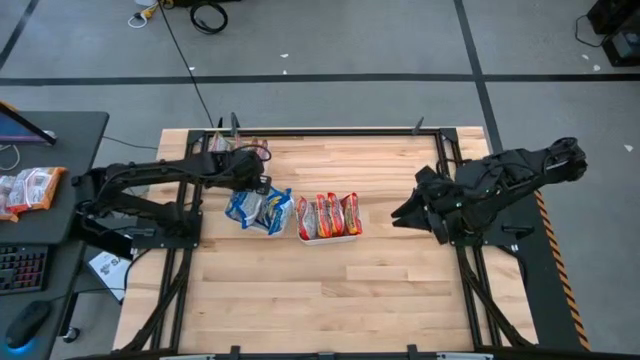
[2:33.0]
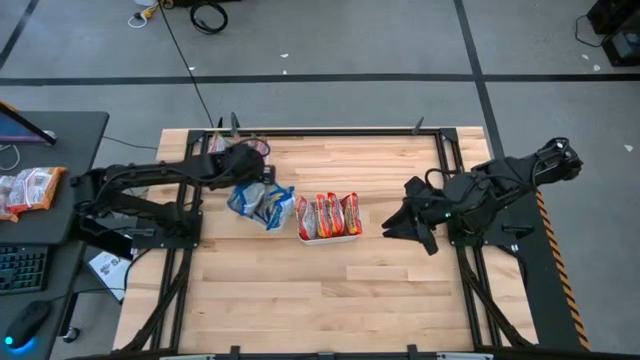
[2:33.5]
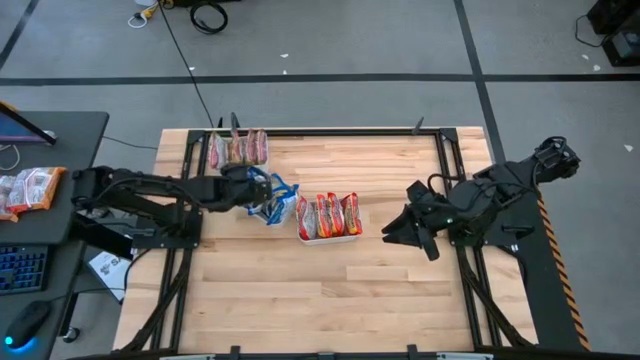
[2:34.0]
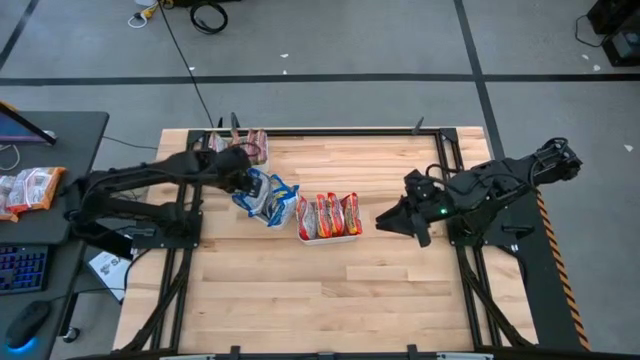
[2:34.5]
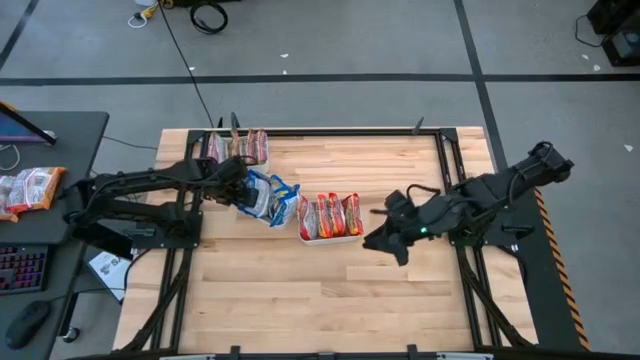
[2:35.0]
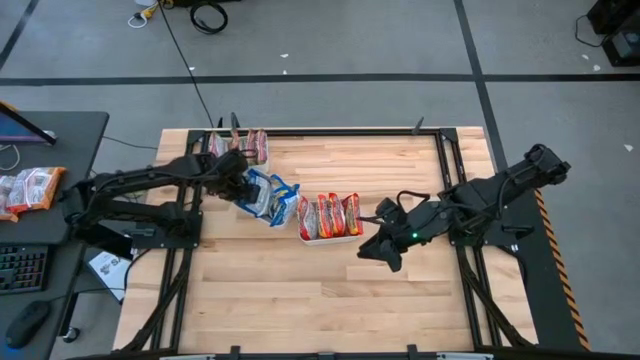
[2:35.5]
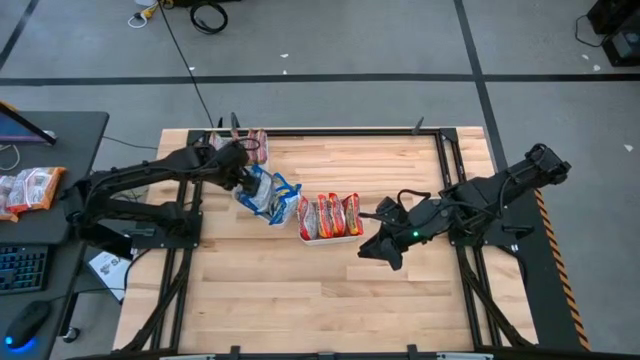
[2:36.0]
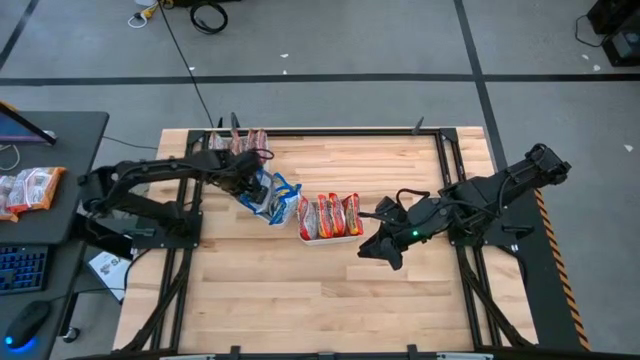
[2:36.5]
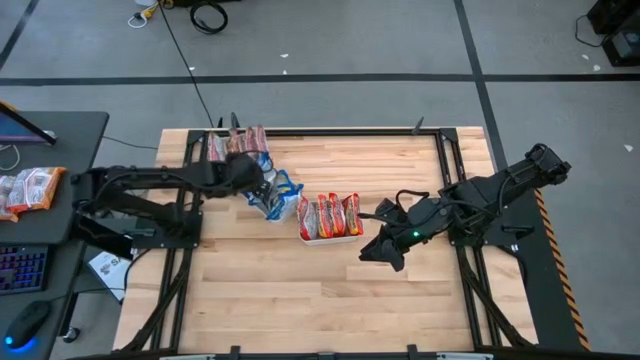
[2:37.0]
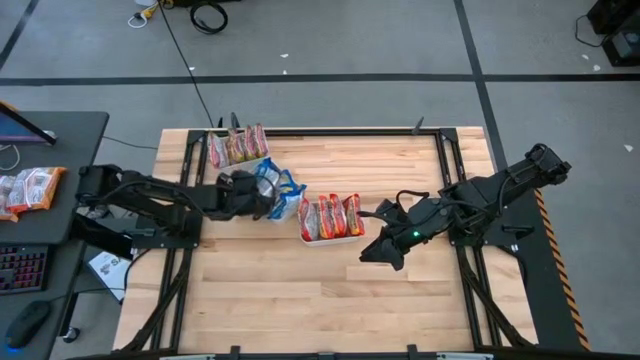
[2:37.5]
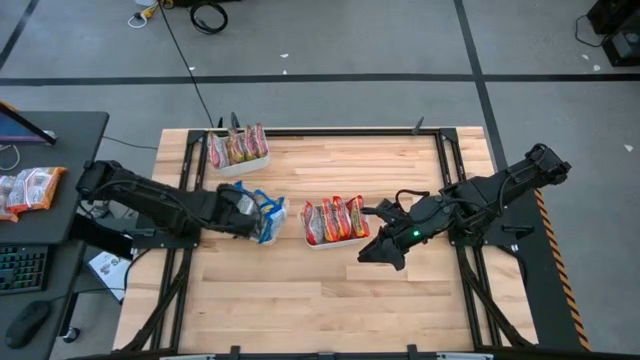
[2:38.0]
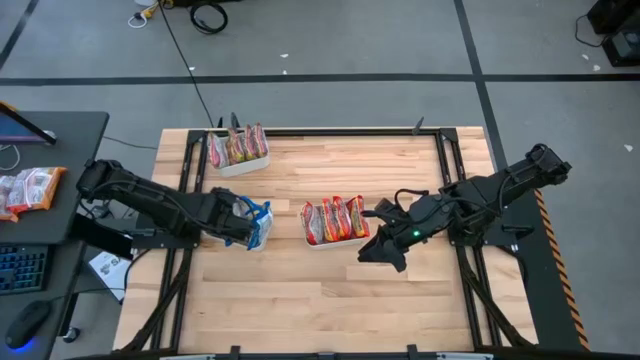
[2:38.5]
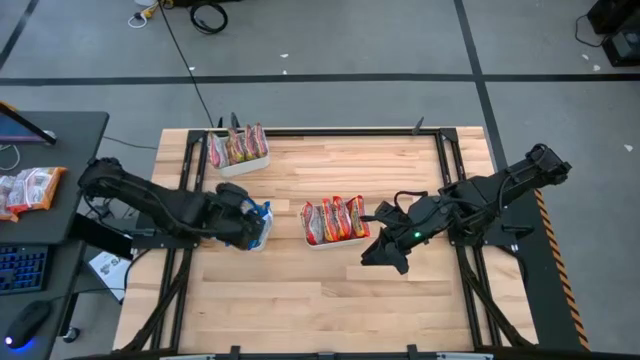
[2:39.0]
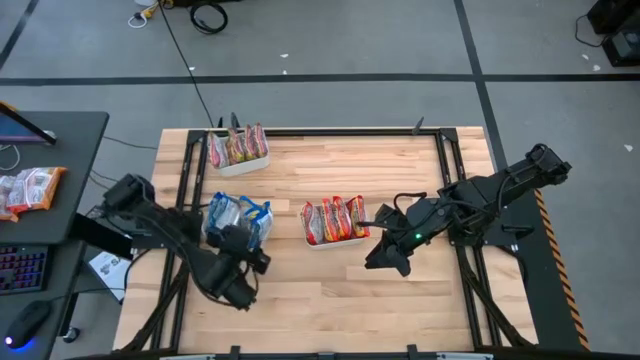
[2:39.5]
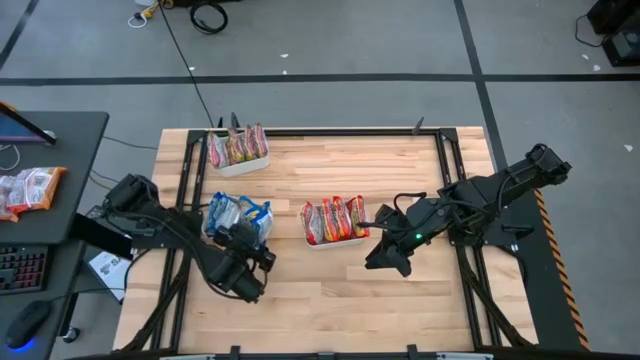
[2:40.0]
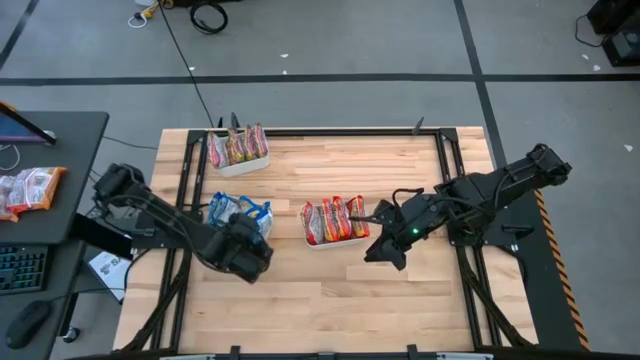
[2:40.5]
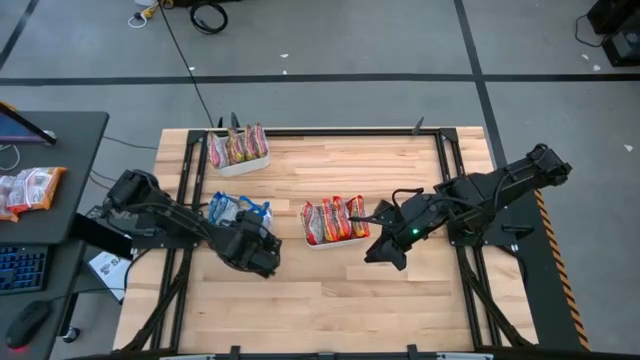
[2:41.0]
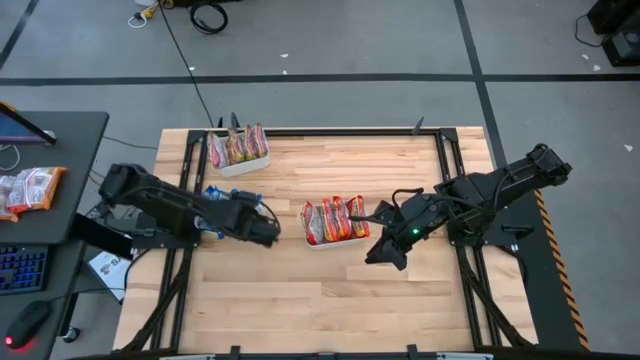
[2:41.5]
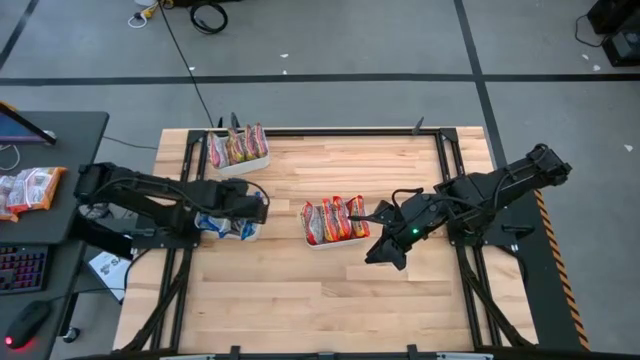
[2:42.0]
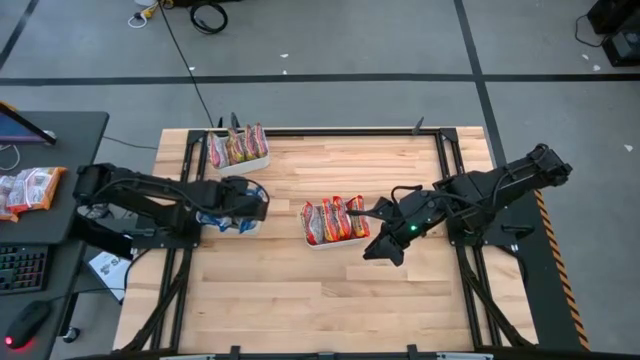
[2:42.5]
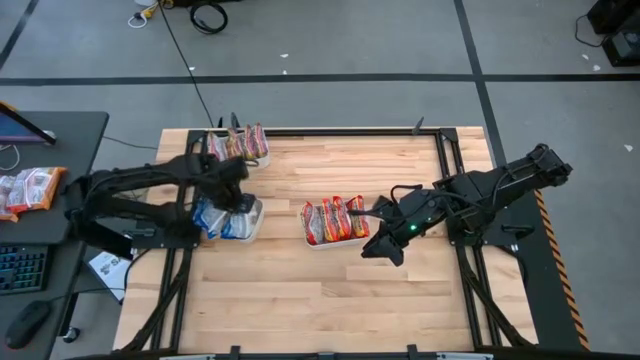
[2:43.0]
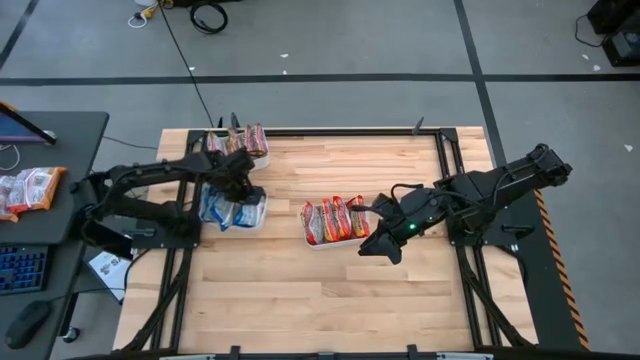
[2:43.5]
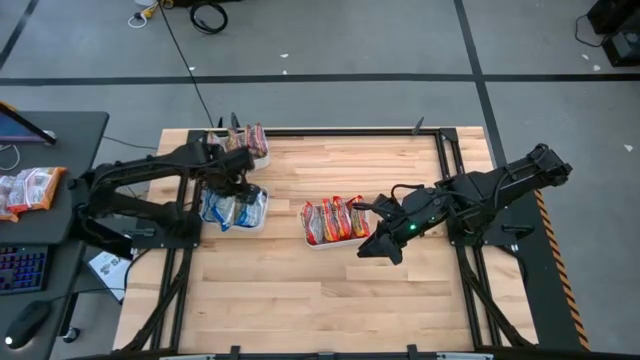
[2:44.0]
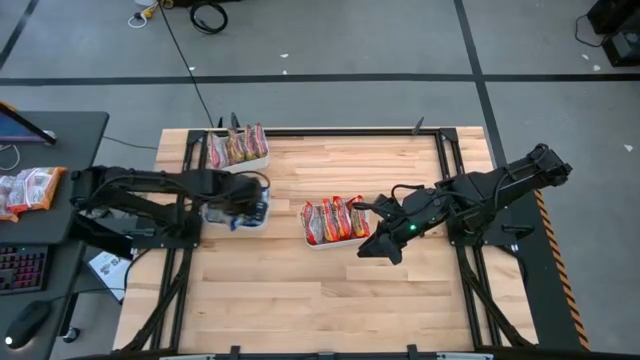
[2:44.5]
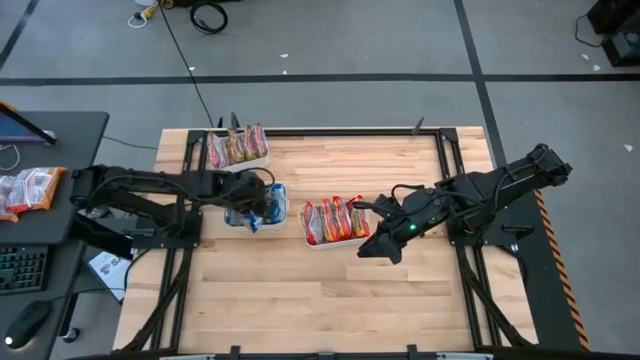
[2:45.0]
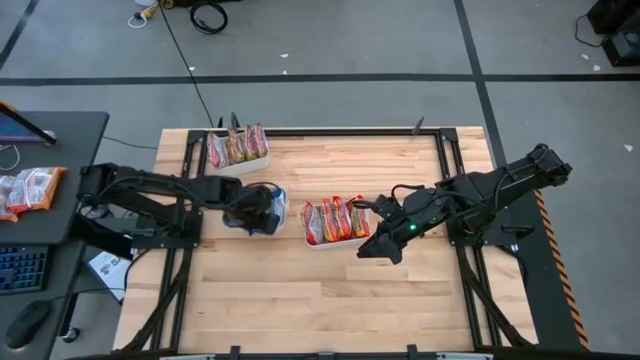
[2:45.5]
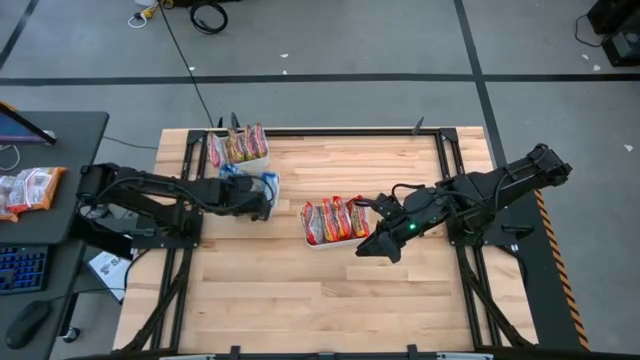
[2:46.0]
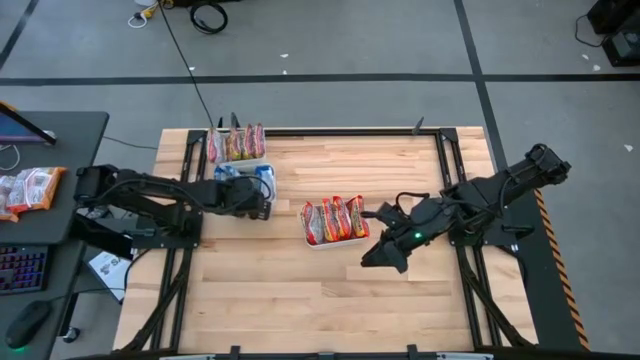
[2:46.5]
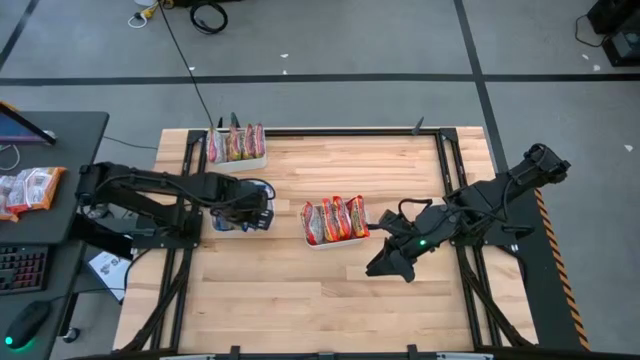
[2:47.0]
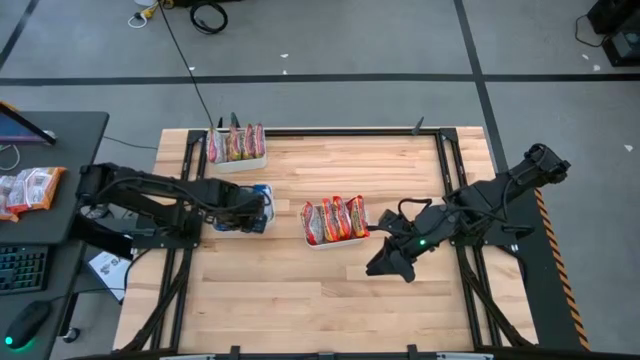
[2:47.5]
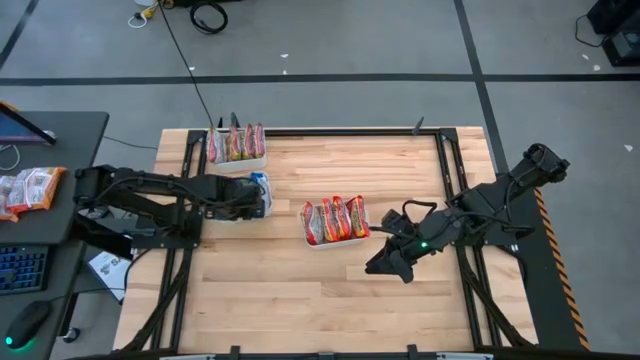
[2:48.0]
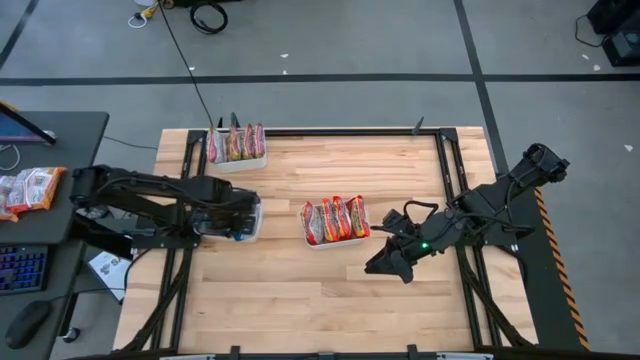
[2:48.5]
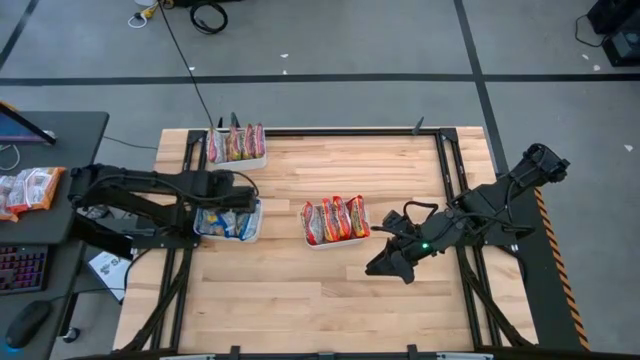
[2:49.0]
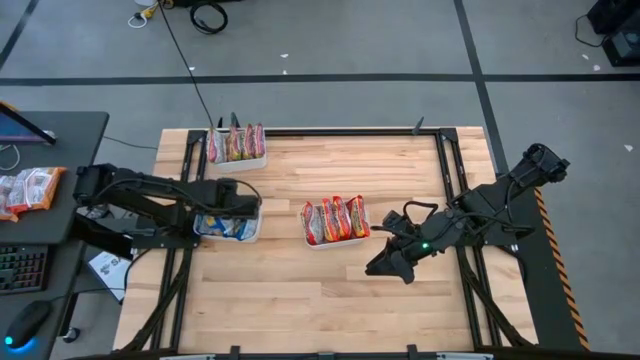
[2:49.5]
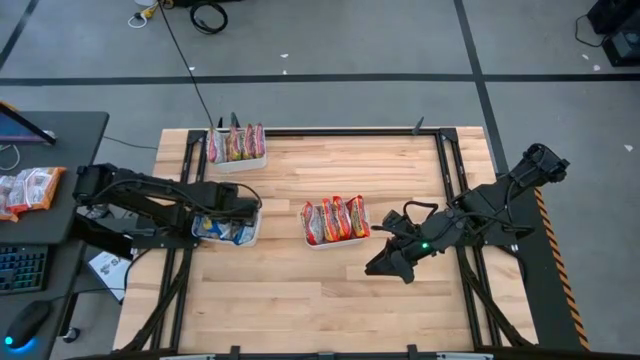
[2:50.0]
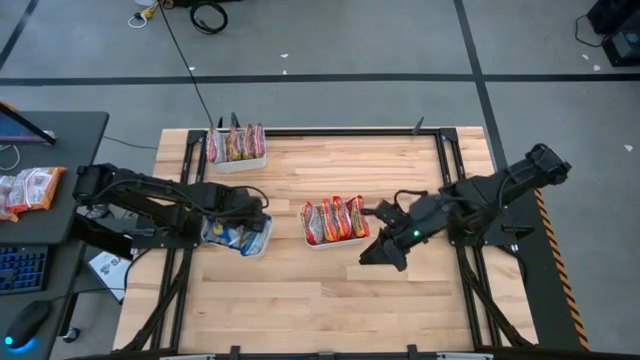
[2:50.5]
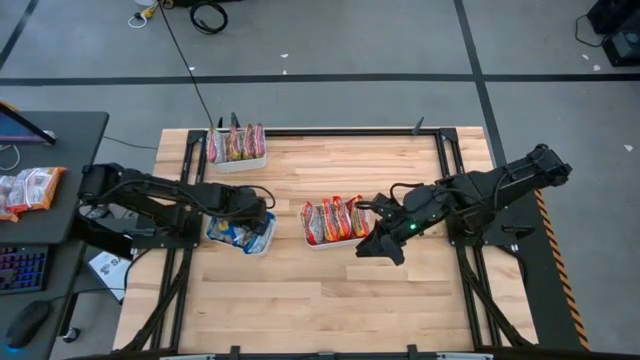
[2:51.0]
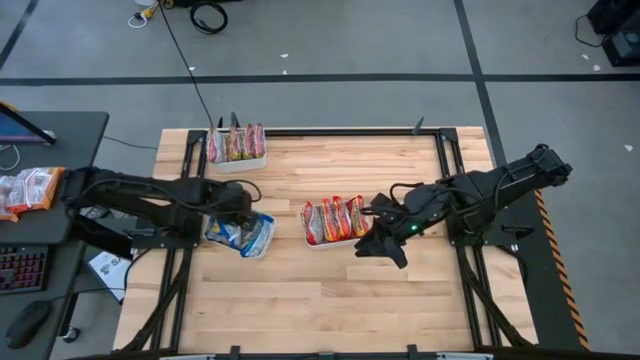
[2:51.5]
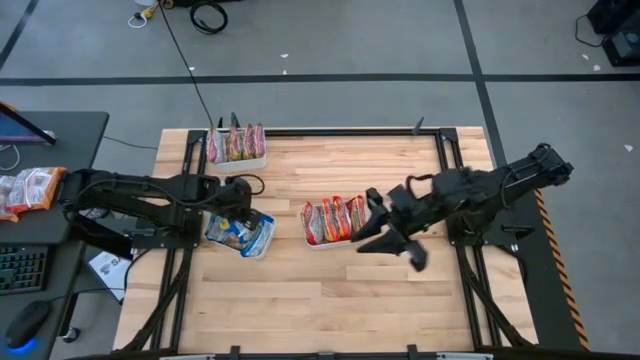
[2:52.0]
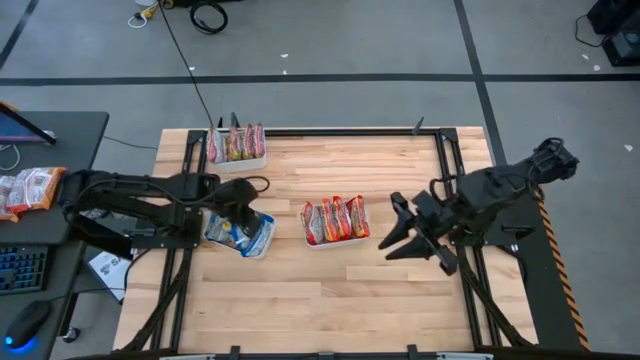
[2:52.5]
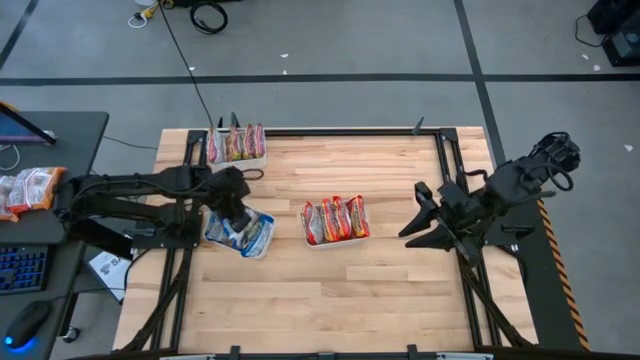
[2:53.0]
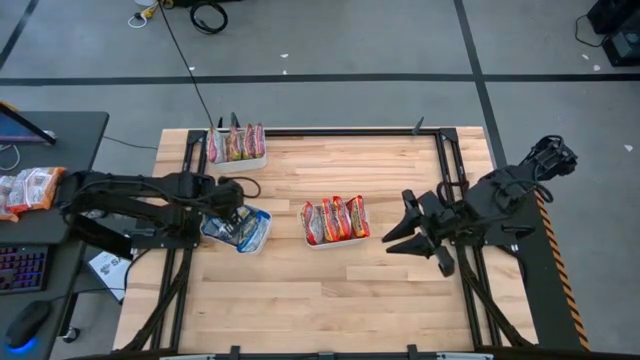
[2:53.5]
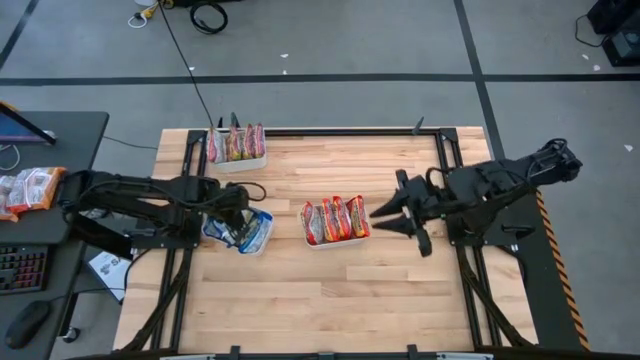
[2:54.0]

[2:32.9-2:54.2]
Task: Sort Maruchan noodles
Adjust the blue noodle packs in the bottom white bin
